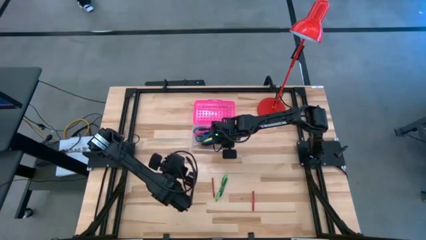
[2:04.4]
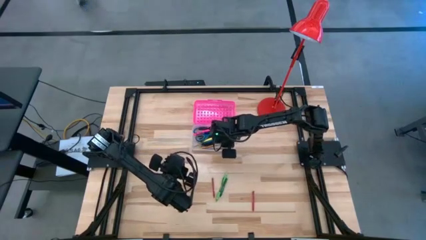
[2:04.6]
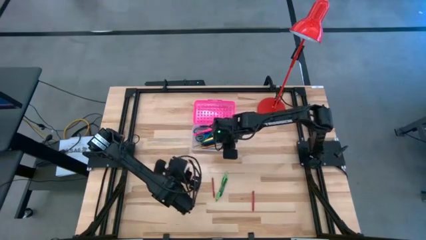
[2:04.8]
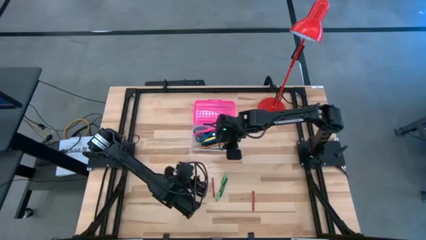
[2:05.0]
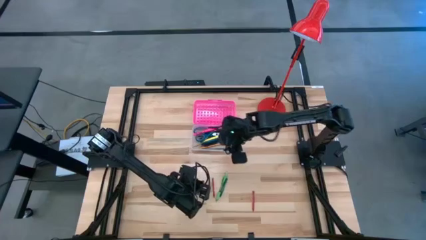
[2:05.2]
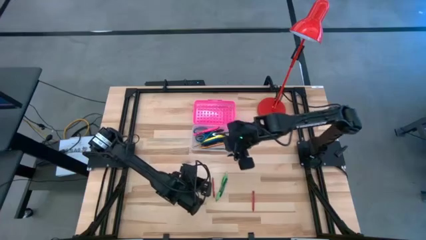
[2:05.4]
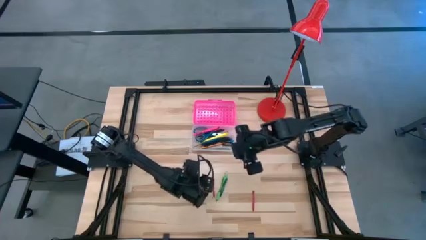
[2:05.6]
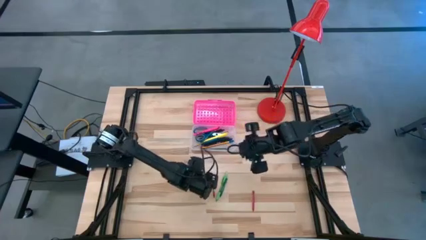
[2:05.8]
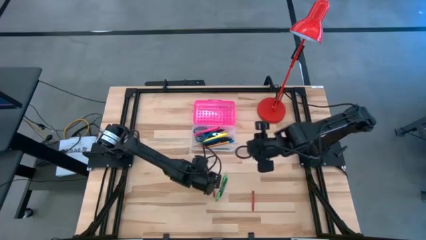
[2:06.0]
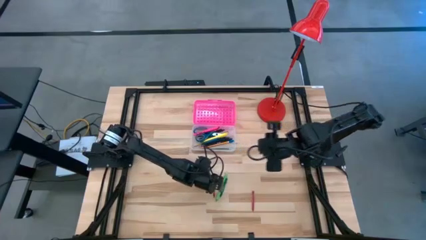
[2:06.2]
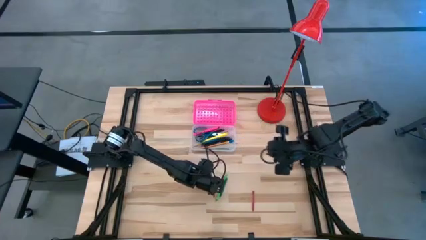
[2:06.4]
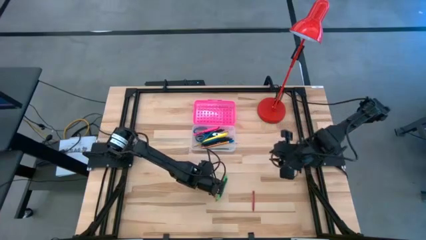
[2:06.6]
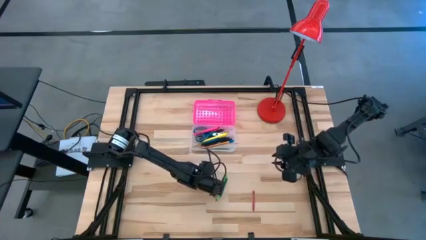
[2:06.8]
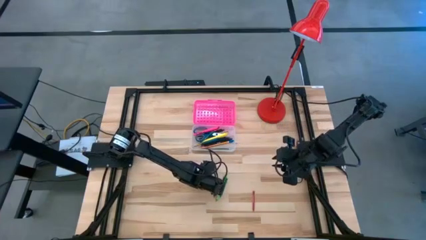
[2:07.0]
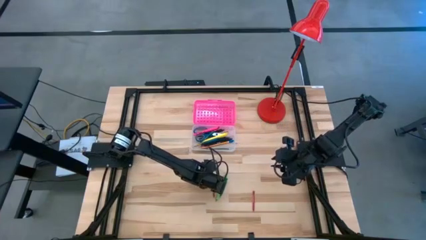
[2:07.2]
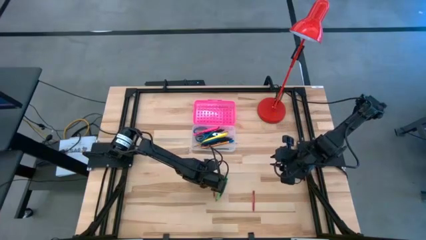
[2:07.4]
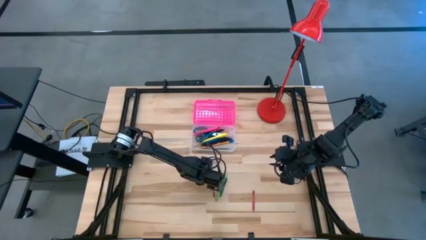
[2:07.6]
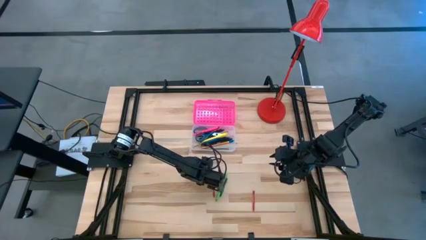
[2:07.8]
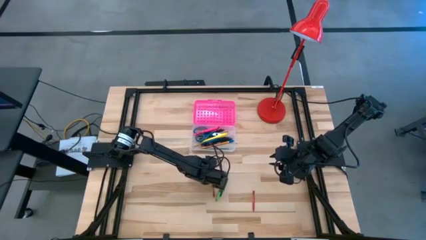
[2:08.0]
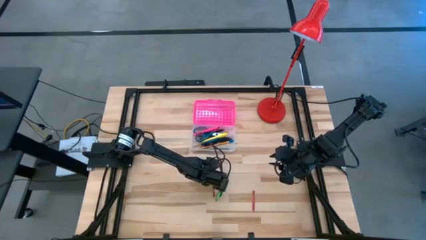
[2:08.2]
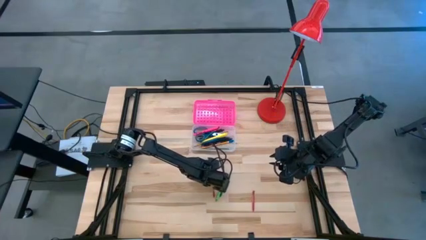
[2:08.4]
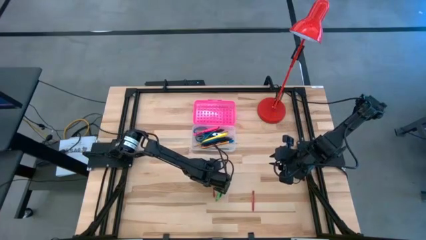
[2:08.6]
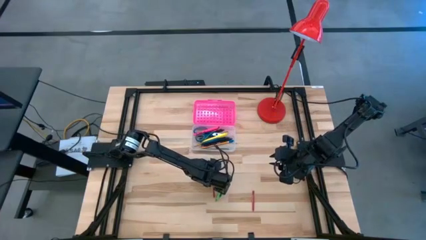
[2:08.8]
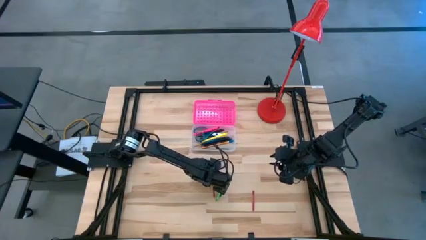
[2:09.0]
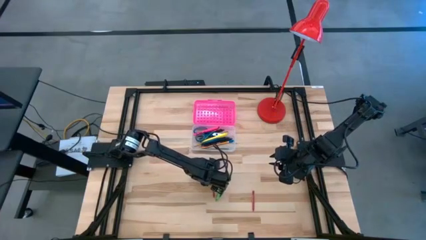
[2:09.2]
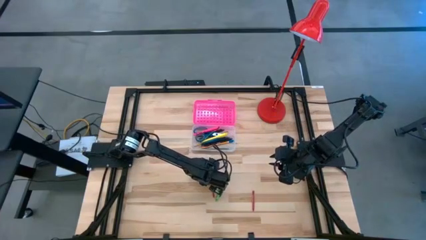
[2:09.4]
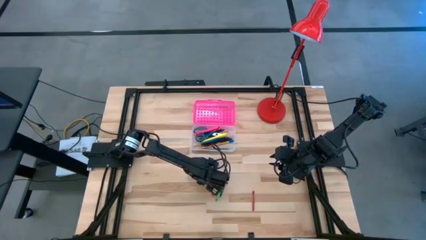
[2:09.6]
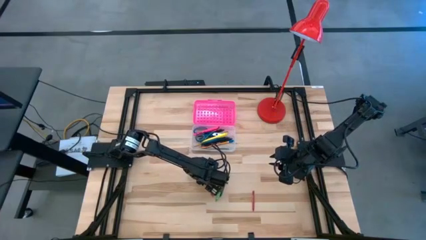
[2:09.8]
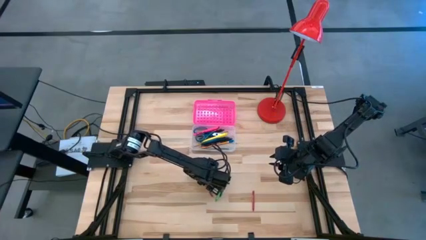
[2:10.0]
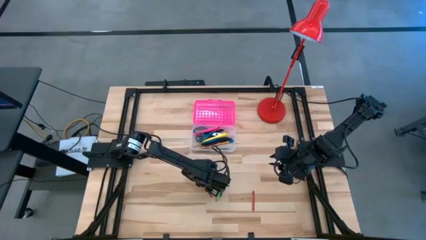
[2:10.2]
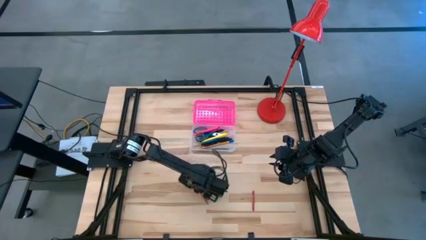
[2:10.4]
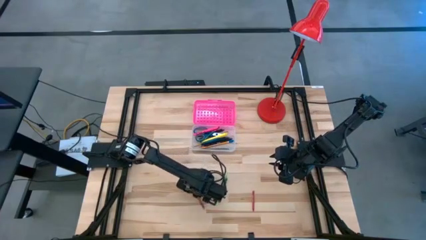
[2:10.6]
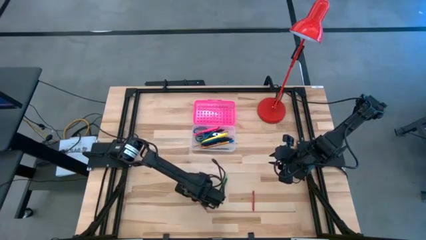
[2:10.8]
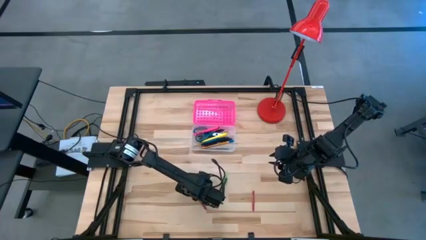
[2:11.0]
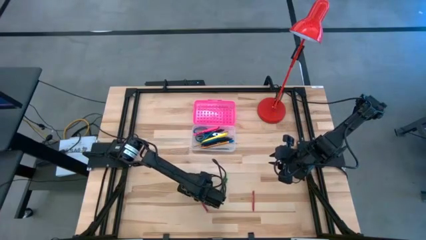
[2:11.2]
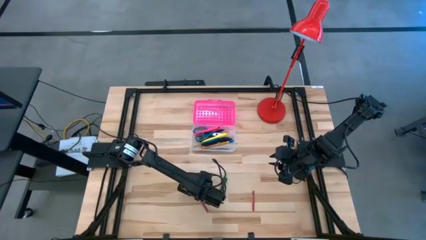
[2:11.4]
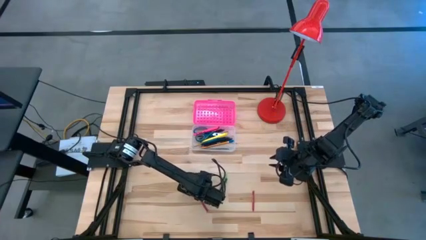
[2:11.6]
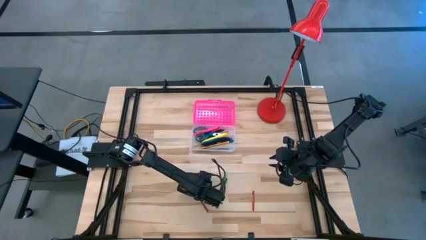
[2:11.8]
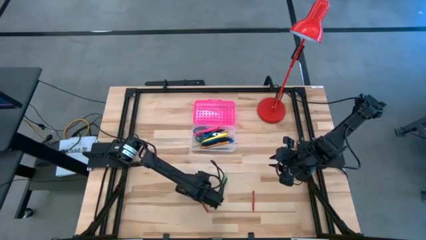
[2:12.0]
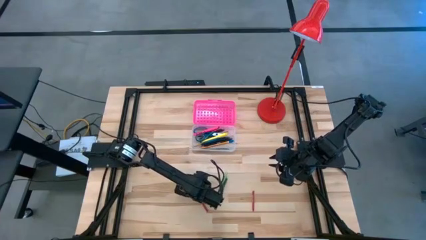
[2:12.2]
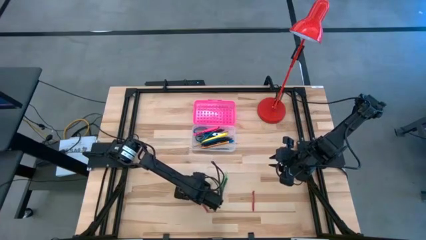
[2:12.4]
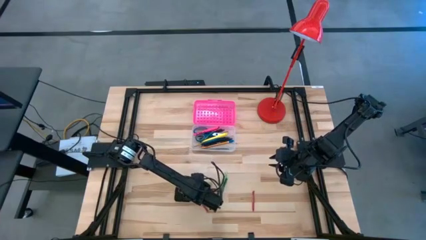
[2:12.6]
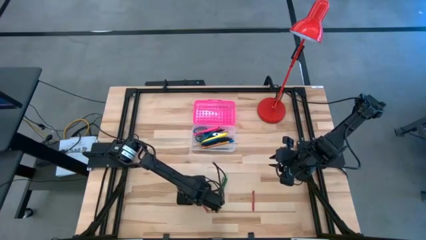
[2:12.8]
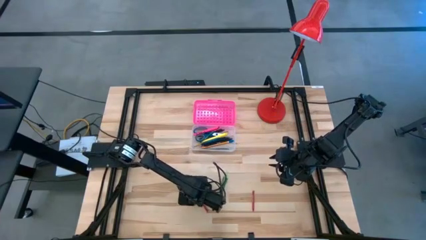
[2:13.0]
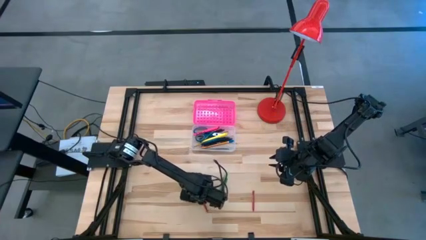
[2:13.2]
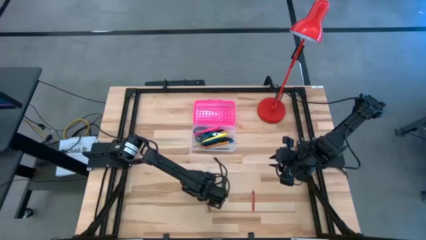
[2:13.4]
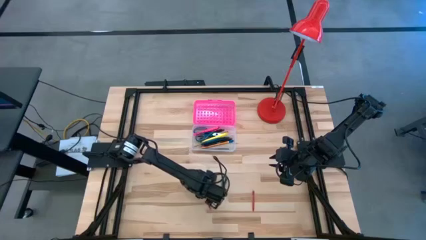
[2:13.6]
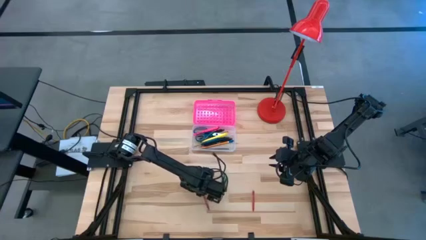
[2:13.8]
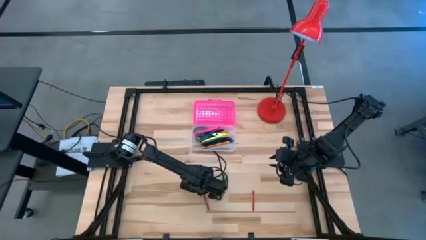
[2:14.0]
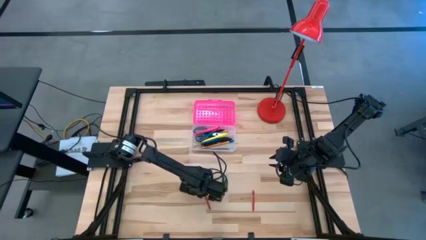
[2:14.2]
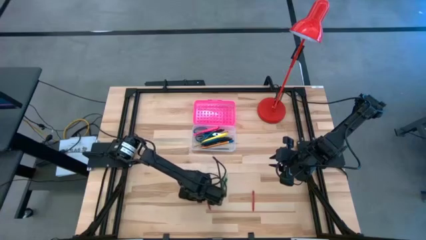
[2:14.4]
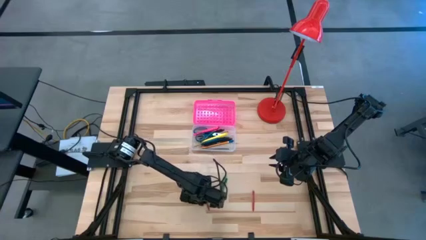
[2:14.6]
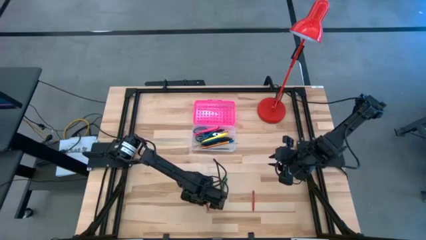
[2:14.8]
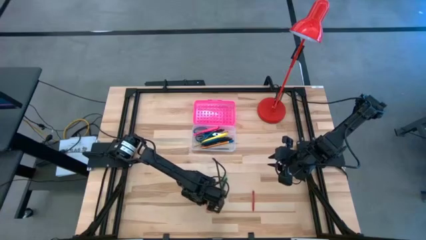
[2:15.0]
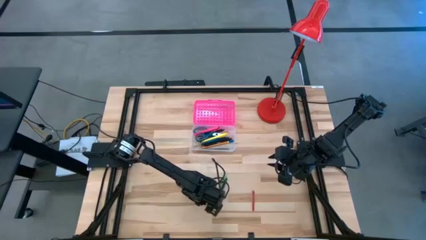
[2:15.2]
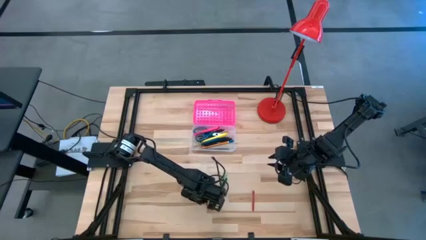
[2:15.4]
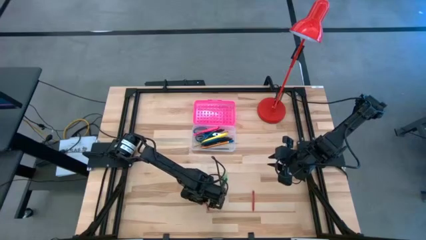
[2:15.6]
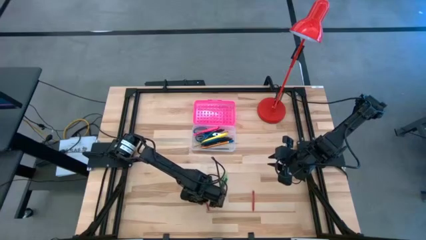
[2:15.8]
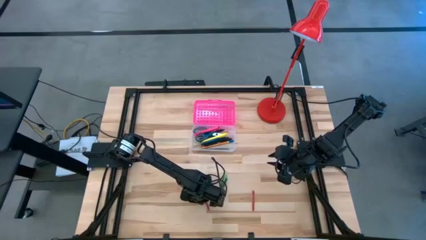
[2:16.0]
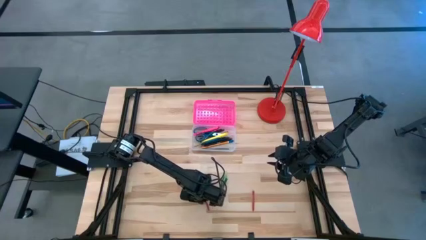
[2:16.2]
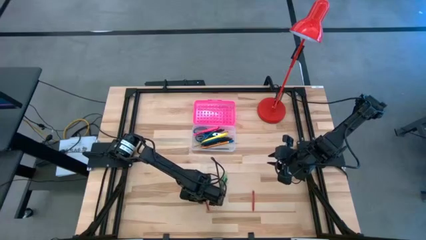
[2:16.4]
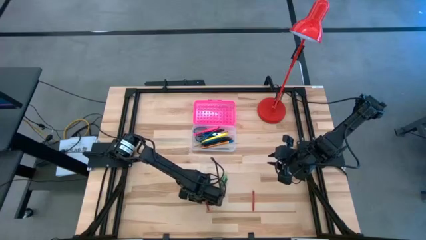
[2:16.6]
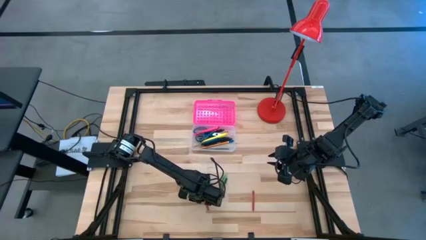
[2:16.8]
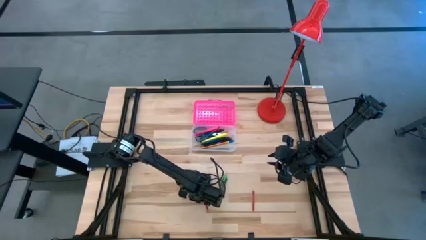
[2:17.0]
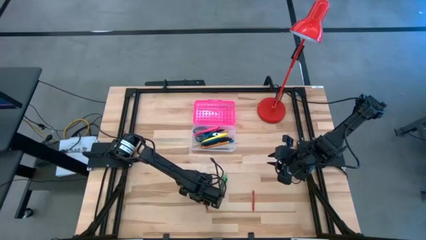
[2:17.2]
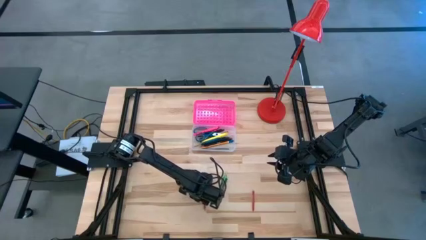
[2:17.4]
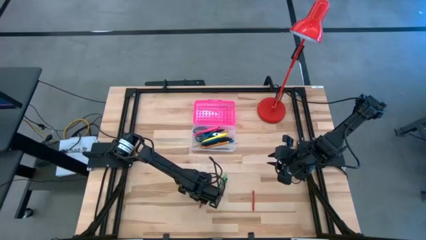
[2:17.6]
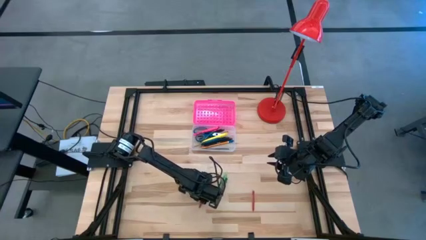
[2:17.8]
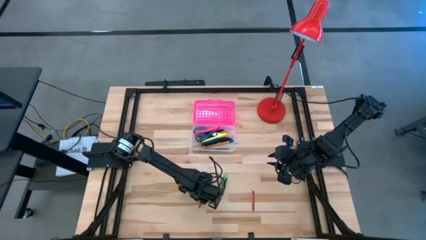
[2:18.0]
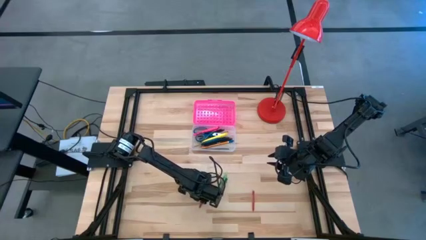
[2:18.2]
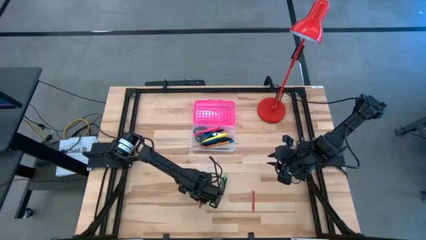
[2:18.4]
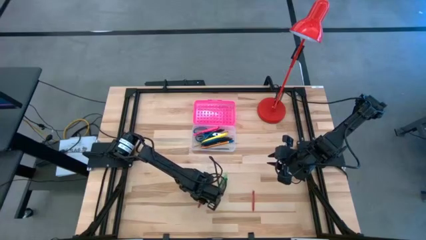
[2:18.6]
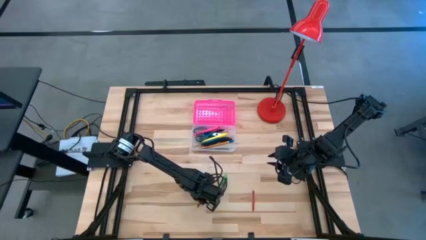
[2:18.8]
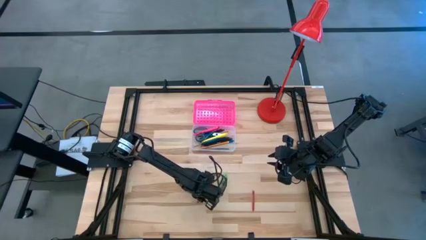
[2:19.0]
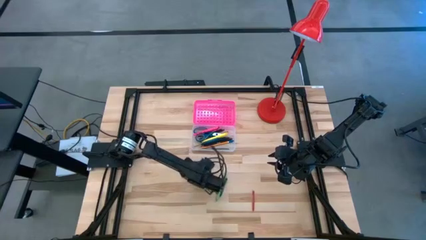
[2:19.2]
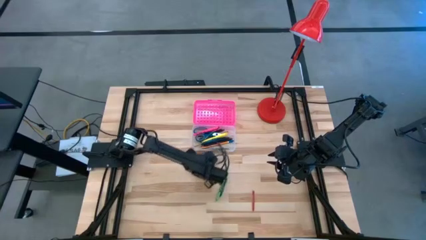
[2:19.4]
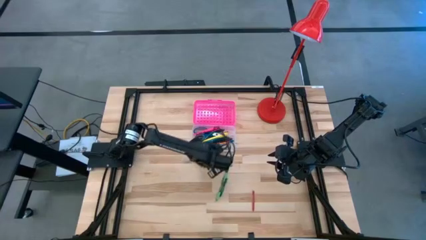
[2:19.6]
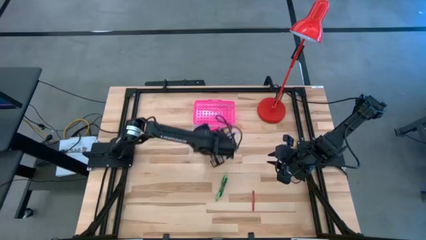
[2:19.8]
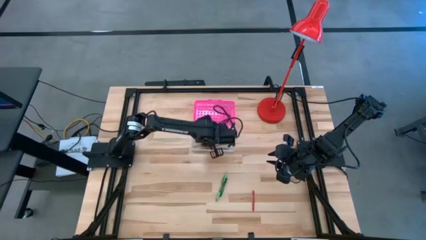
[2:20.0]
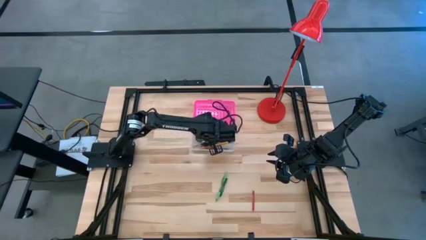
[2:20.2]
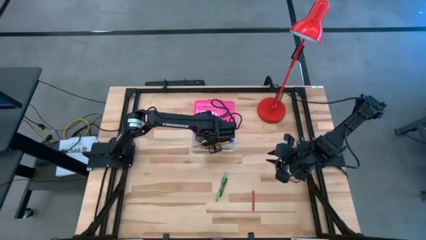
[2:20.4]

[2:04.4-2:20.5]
Task: Pick & place school supplies into a supply box
Put the red crayon into the pink supply box
